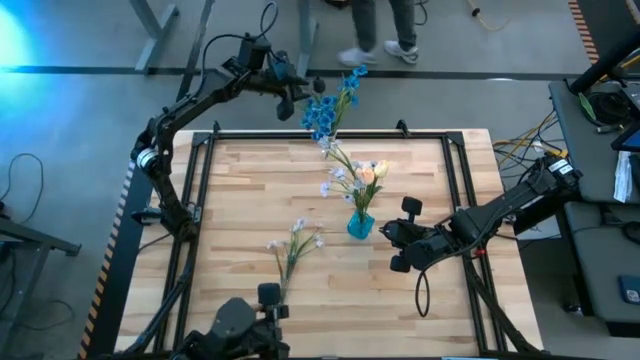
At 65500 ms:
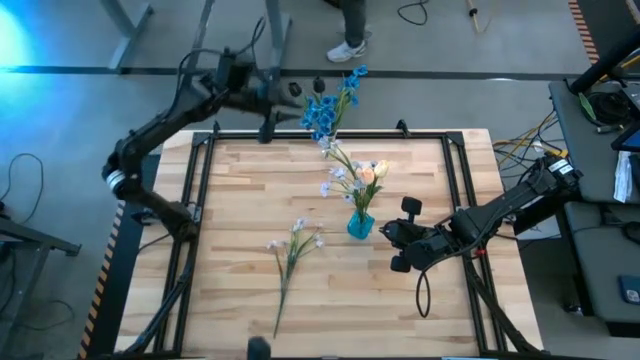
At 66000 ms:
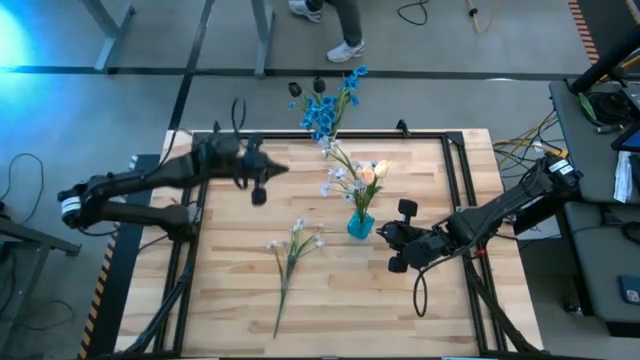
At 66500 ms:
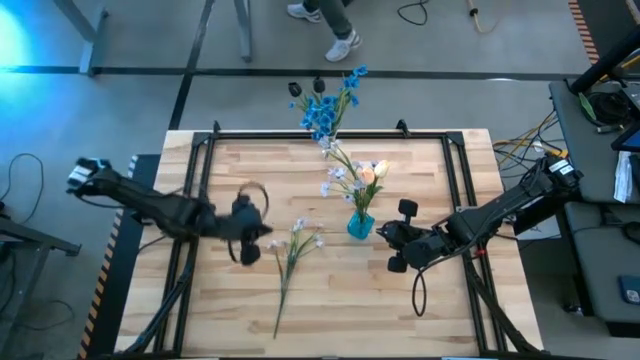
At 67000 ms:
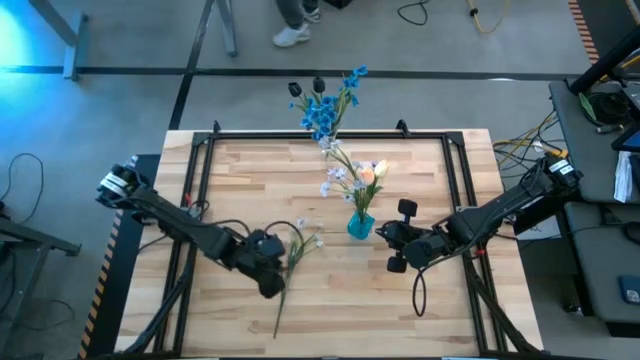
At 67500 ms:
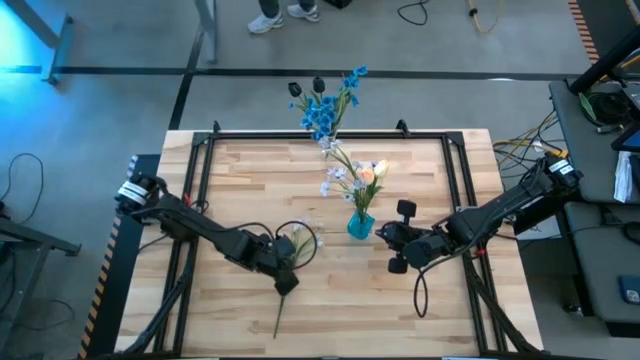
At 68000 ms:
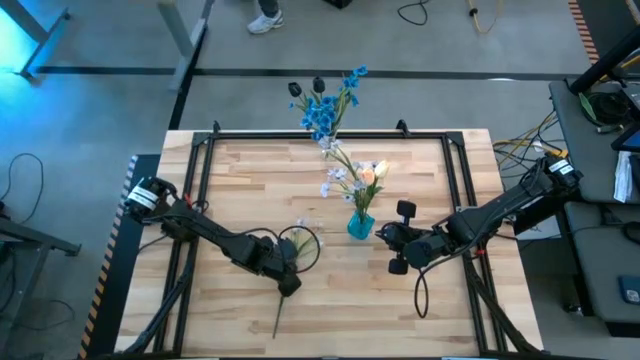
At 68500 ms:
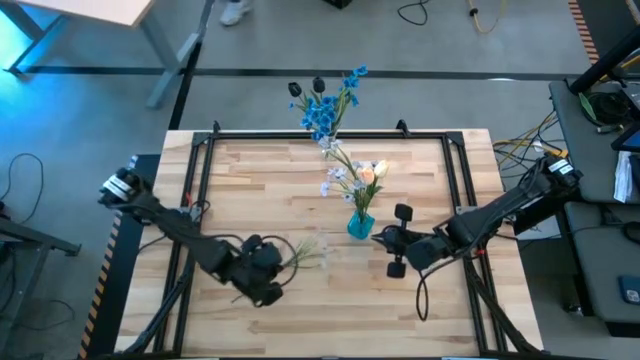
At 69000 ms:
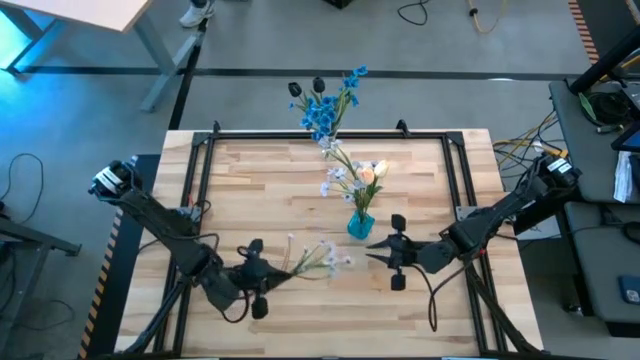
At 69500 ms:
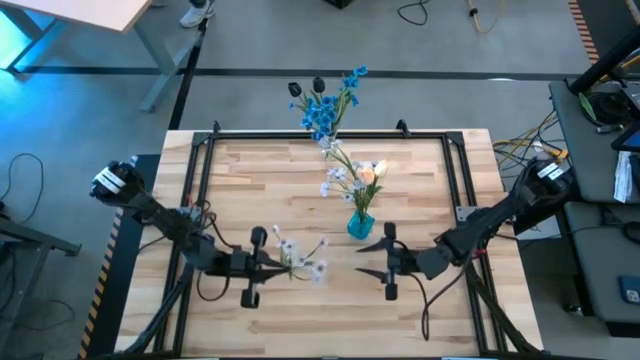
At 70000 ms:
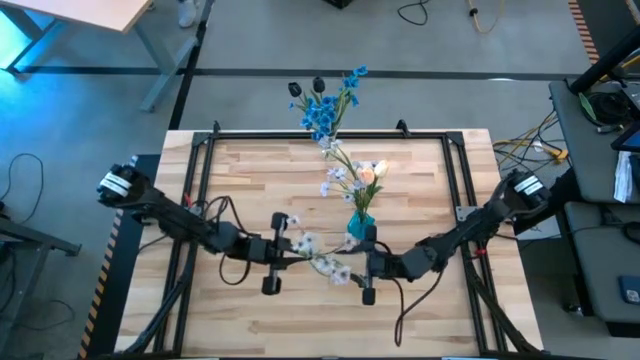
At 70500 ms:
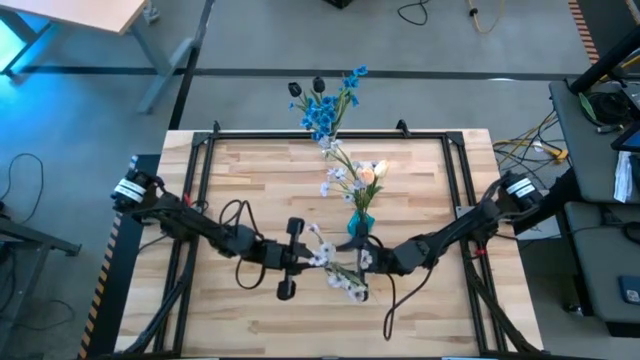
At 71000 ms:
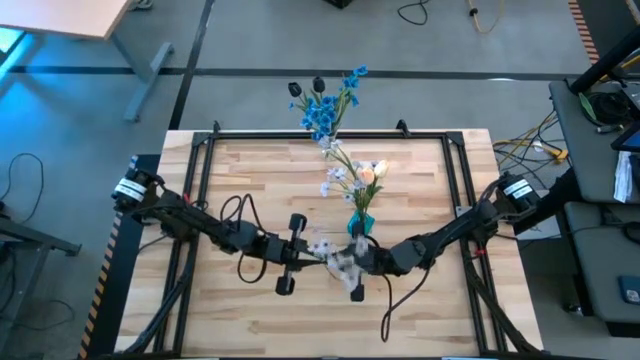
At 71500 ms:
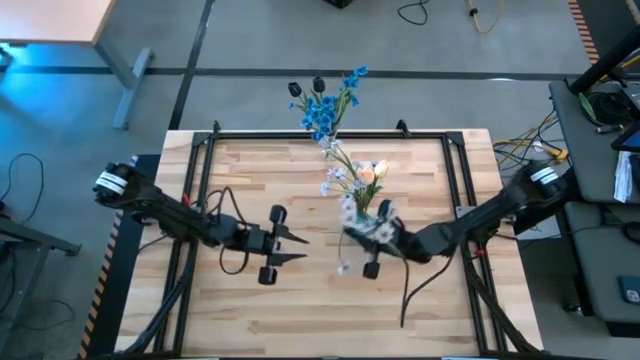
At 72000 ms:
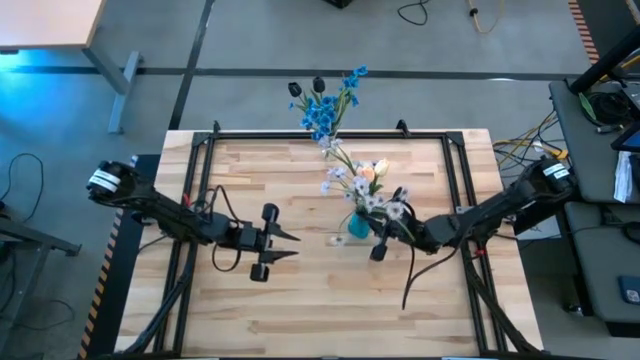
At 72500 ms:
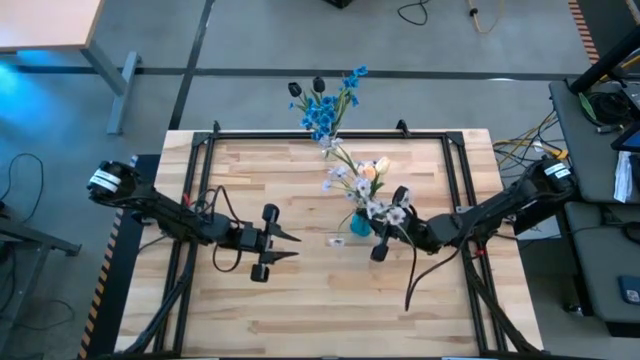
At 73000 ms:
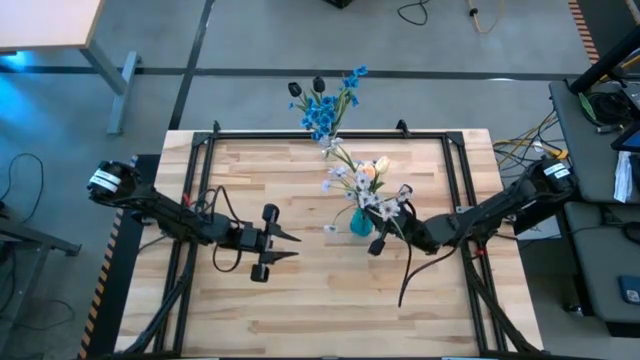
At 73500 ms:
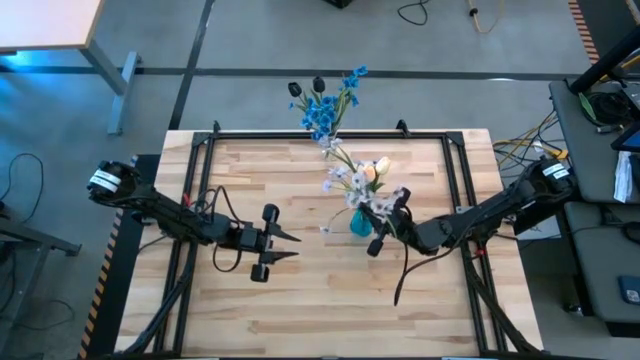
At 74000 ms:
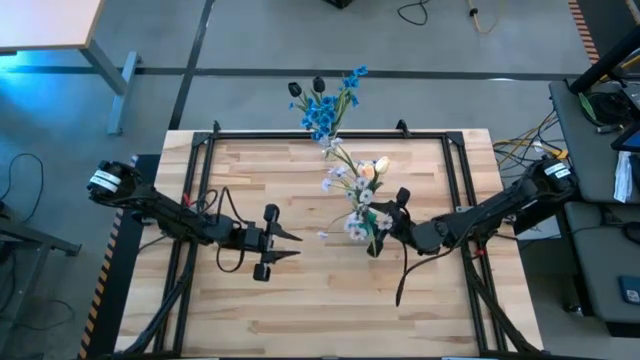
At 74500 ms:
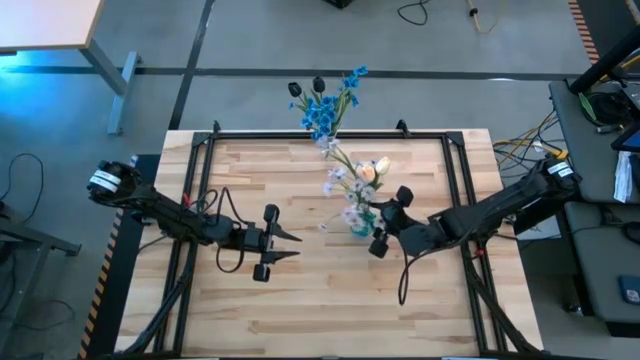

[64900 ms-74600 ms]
Task: Sort flowers into vase by color
Put the white flower into the blue vase

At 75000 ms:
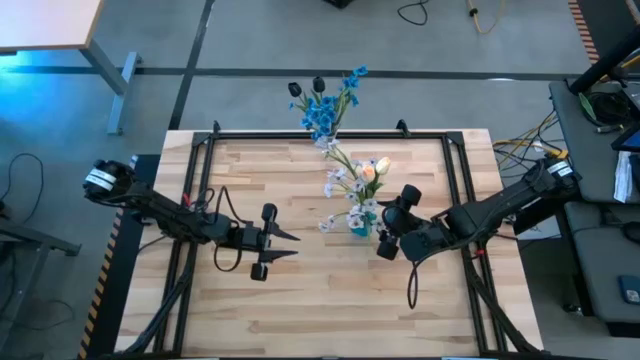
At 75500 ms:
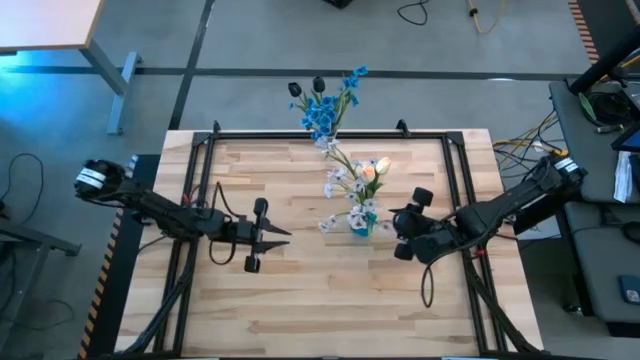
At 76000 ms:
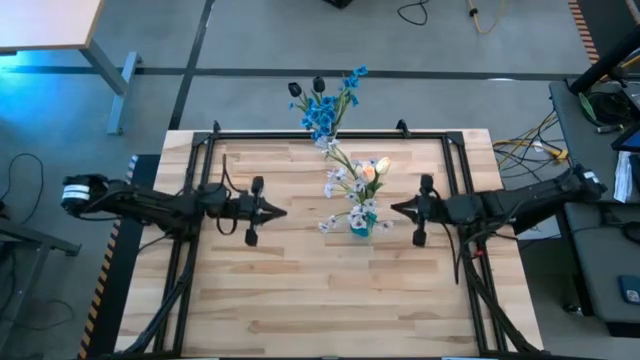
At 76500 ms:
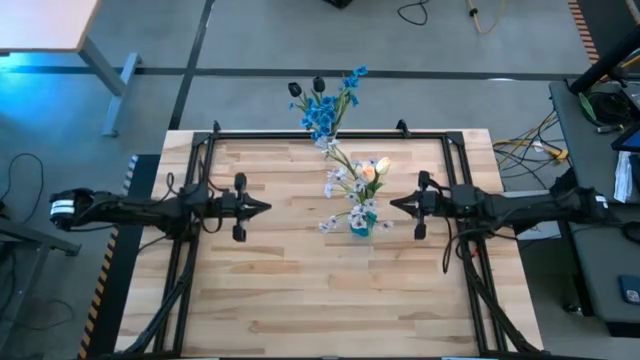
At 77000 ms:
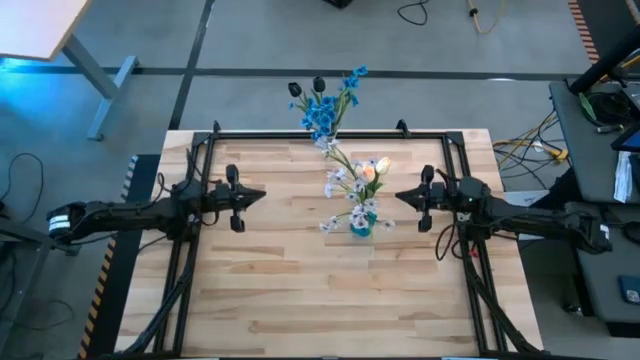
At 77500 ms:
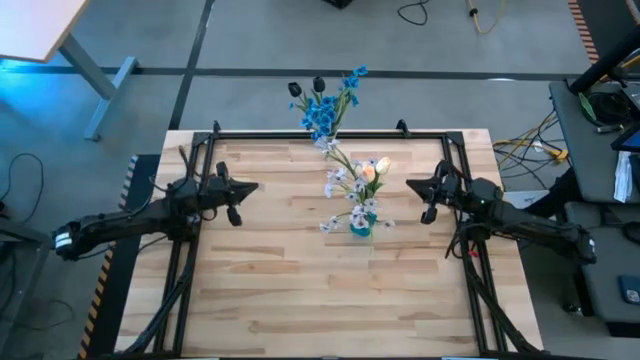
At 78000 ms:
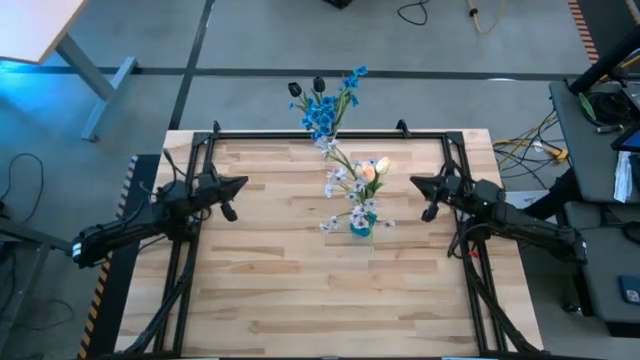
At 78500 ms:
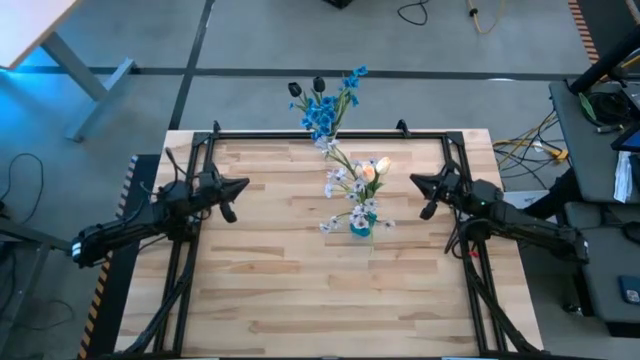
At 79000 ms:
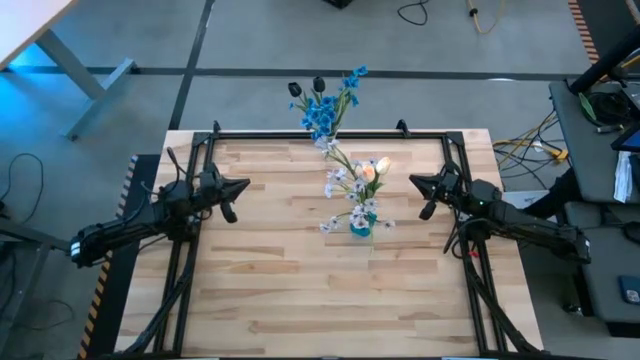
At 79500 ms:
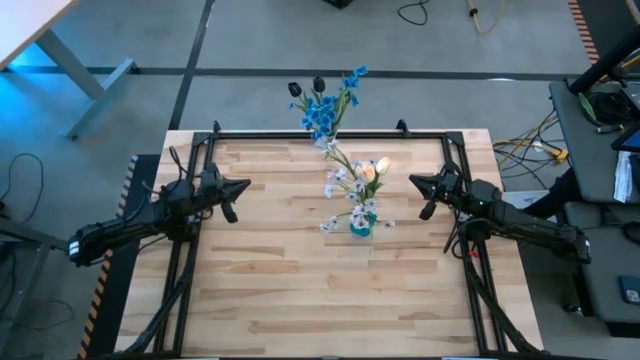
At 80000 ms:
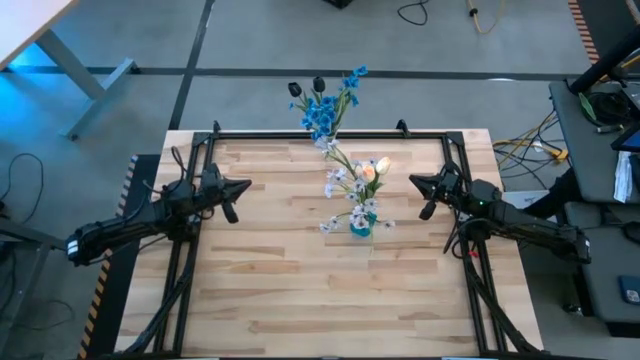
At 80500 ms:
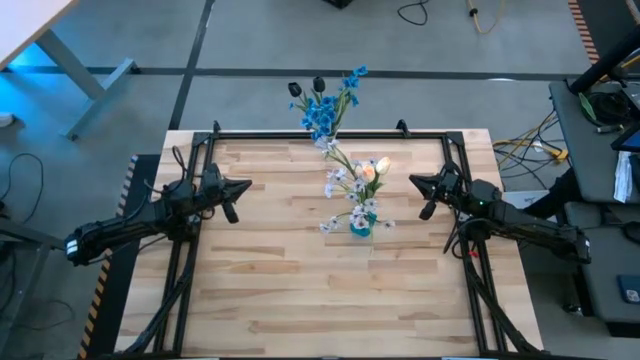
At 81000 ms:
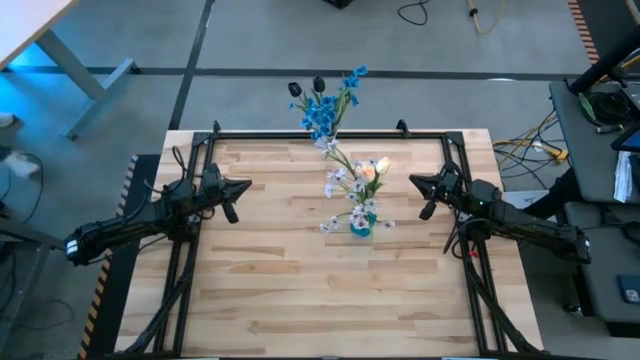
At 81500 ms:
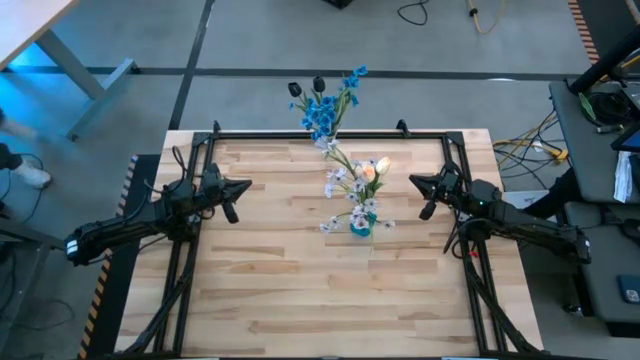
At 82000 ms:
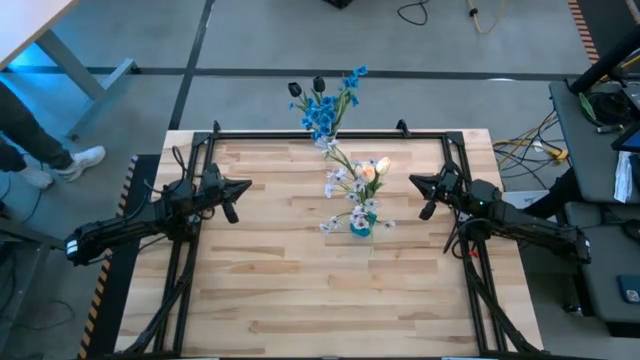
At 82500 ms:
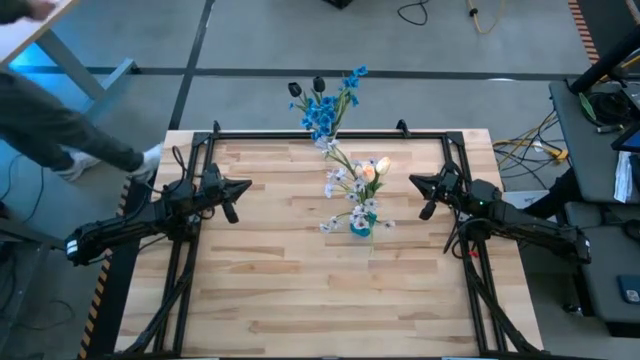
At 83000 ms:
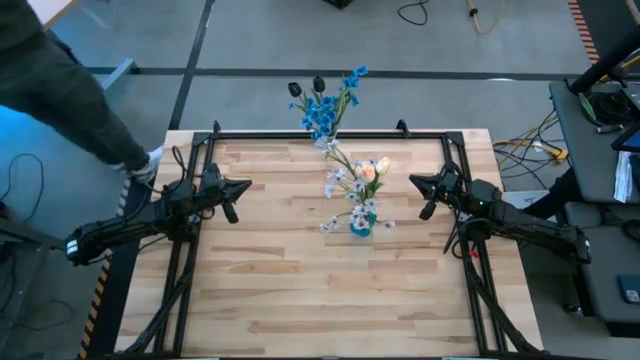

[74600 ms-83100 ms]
Return to Home Position

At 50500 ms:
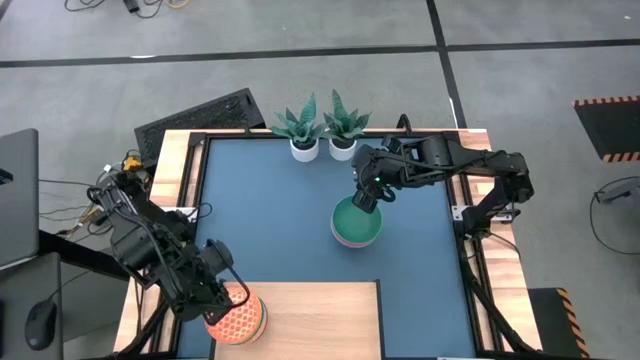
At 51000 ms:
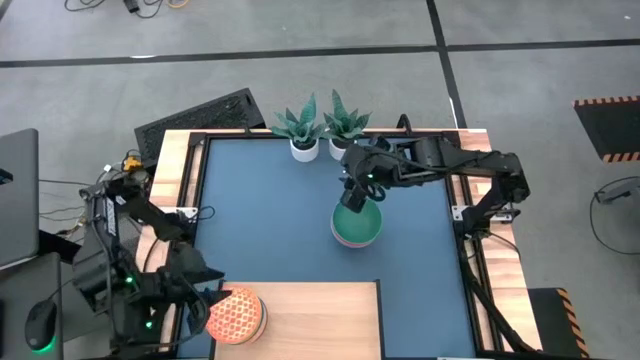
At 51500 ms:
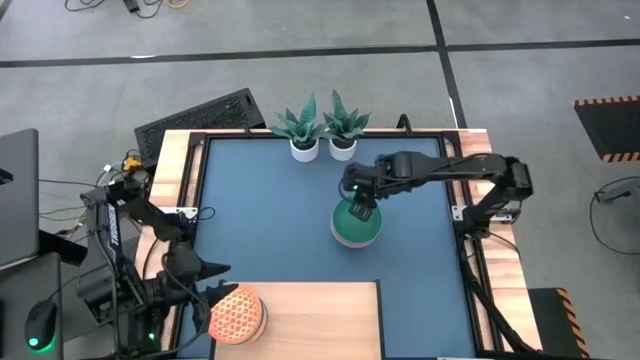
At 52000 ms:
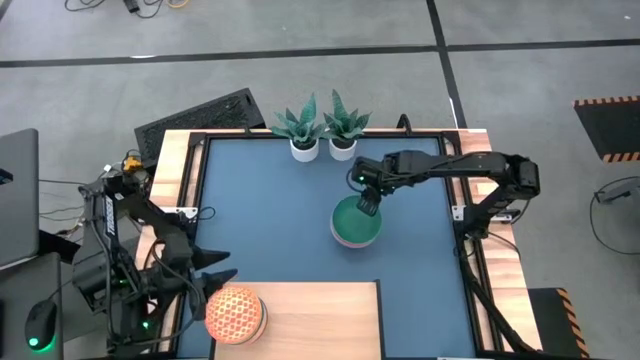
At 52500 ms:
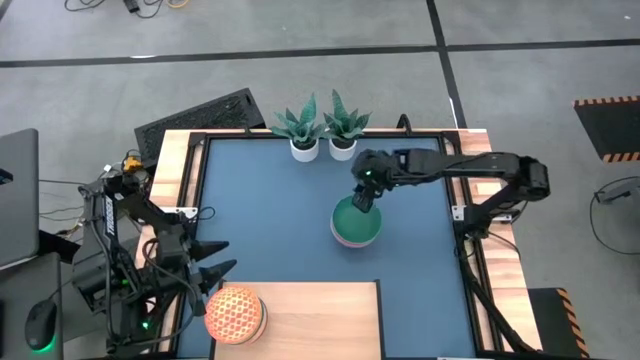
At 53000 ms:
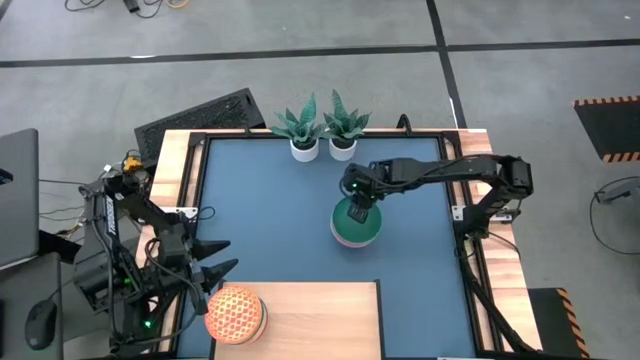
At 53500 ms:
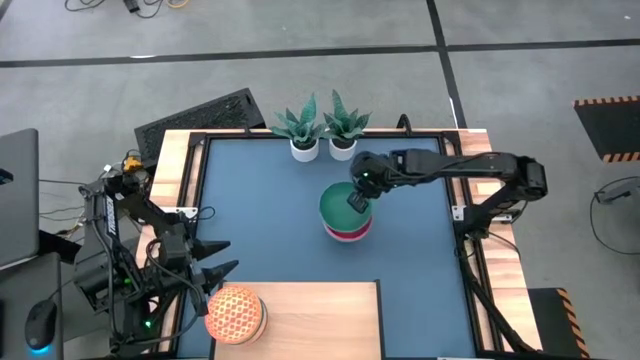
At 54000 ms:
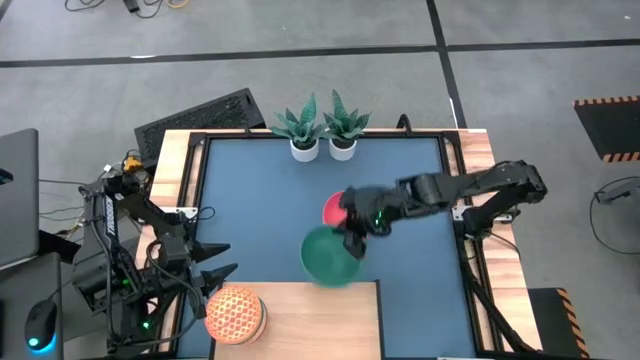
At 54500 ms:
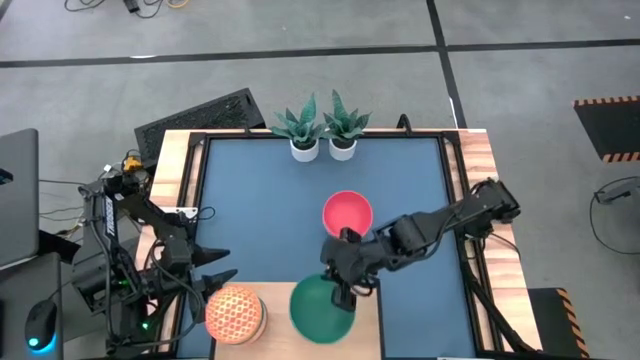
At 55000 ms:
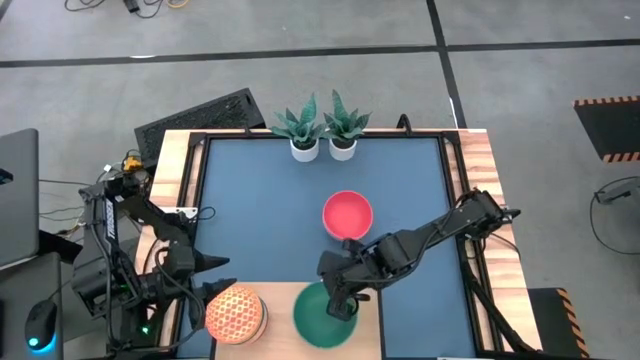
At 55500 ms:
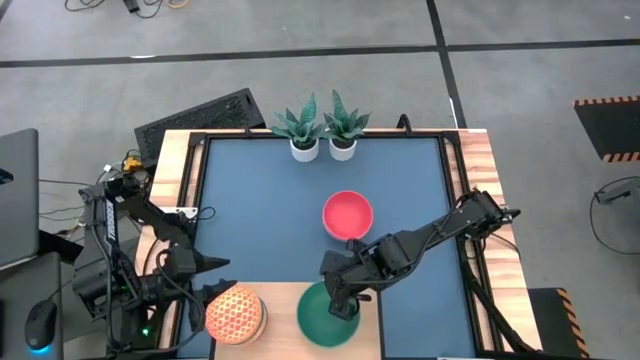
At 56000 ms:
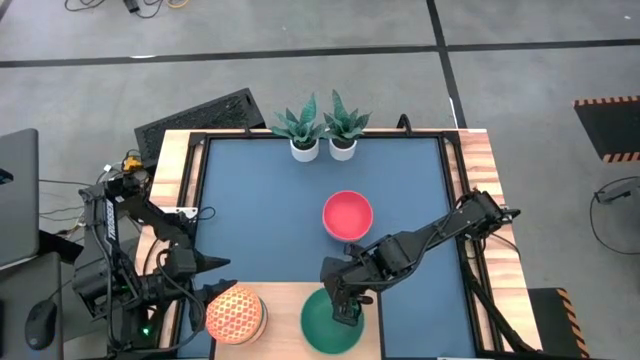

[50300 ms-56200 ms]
Task: Place and stack bowls onto a shelf
Put the green bowl on the shelf
